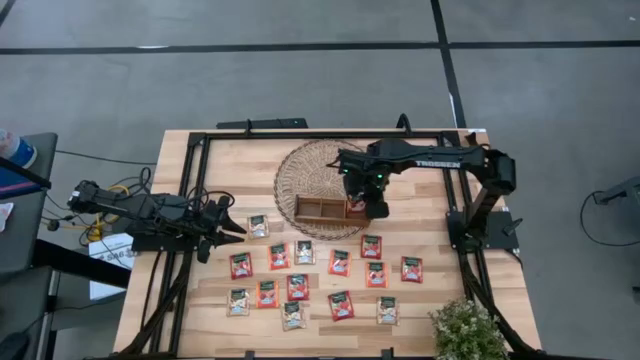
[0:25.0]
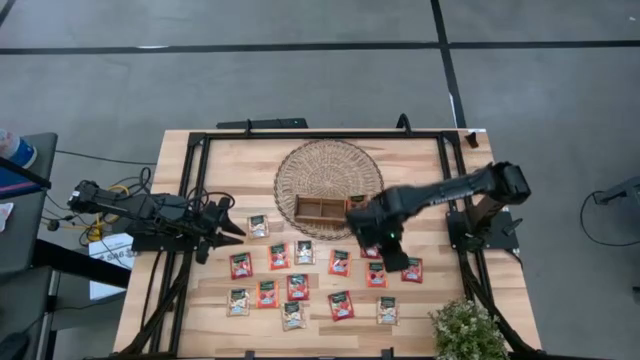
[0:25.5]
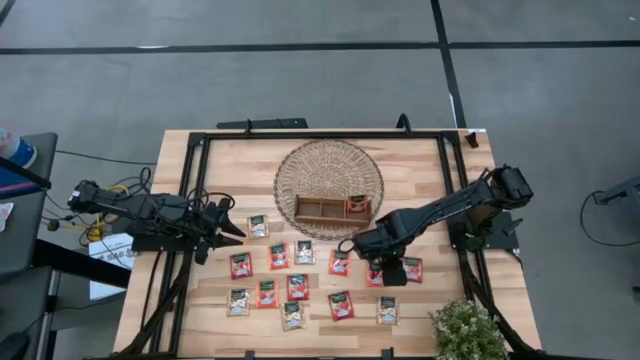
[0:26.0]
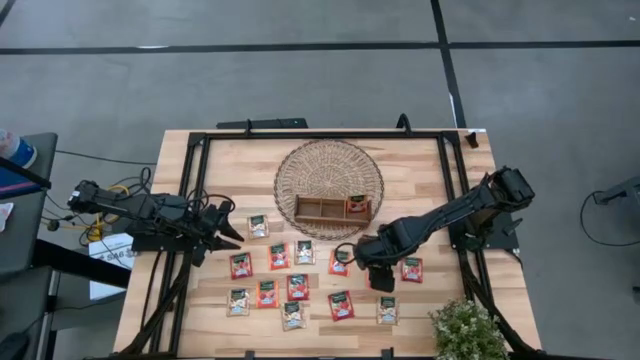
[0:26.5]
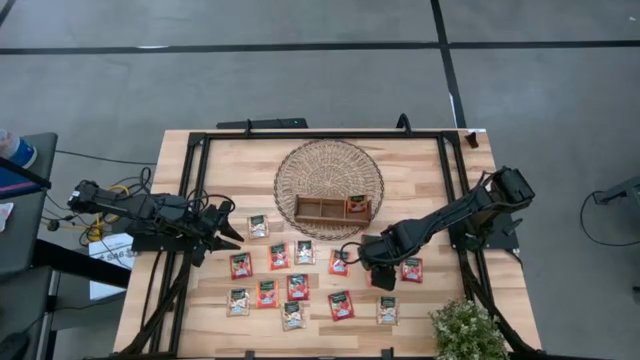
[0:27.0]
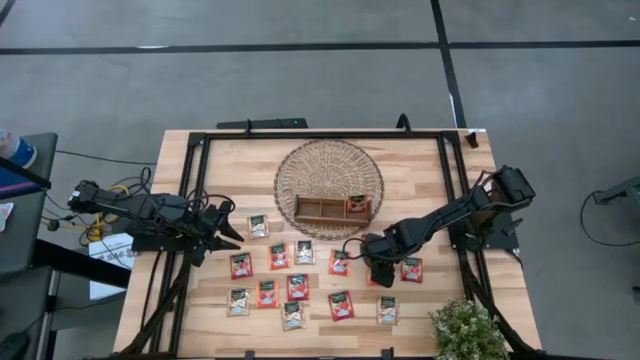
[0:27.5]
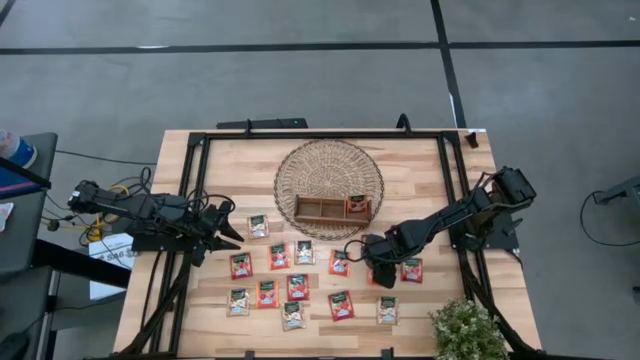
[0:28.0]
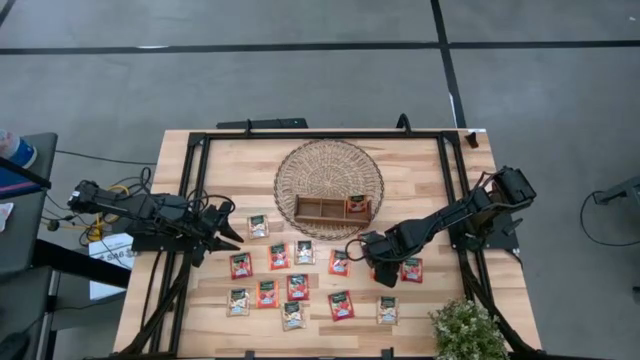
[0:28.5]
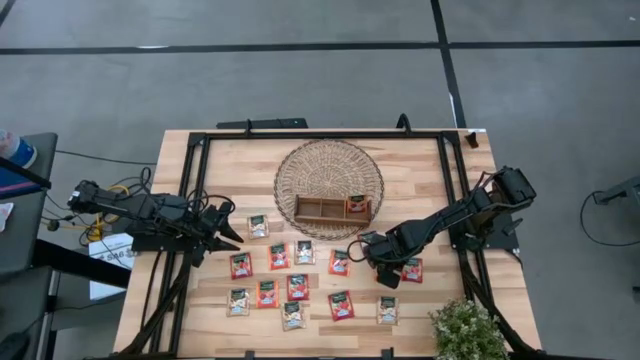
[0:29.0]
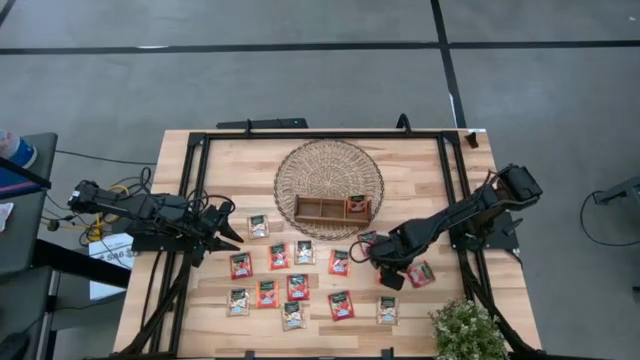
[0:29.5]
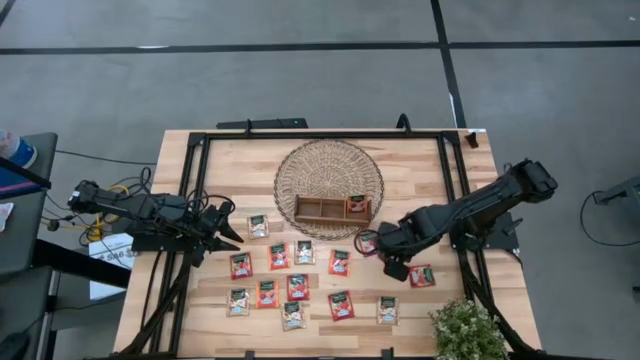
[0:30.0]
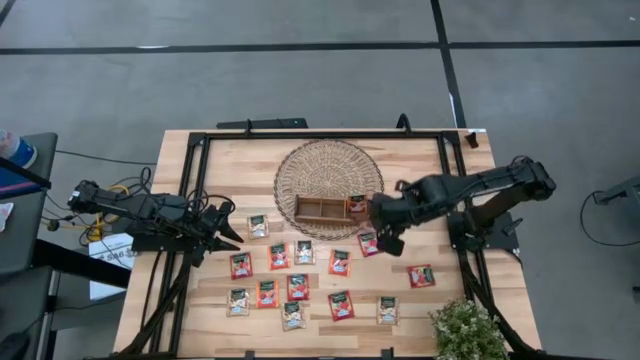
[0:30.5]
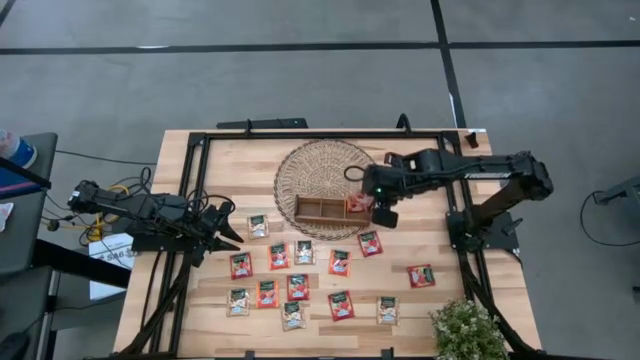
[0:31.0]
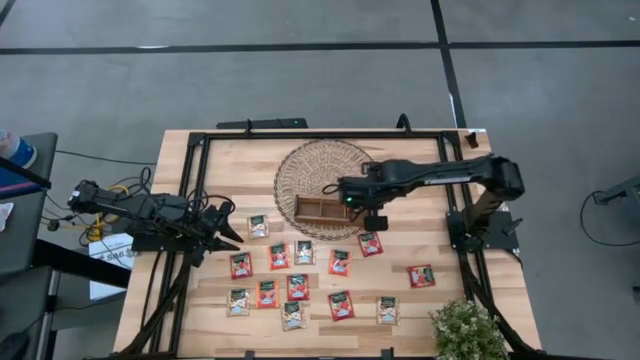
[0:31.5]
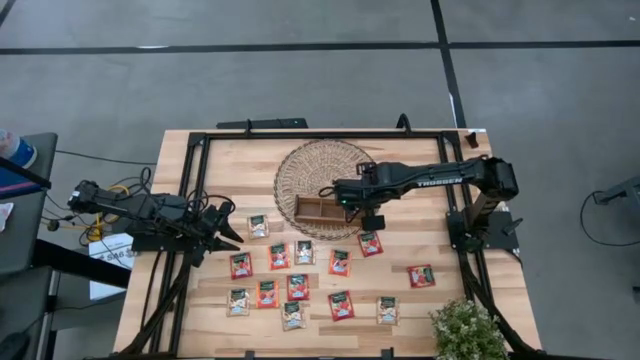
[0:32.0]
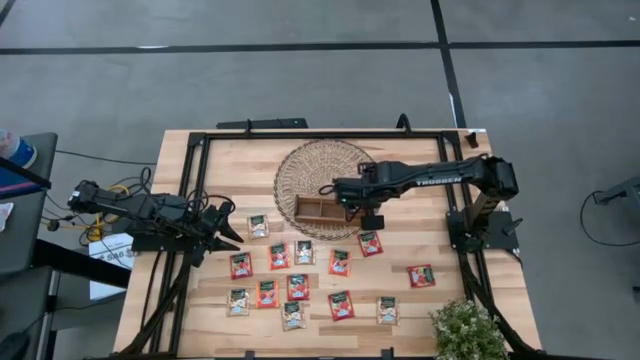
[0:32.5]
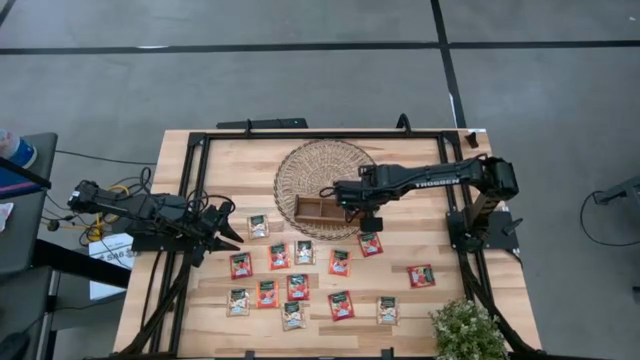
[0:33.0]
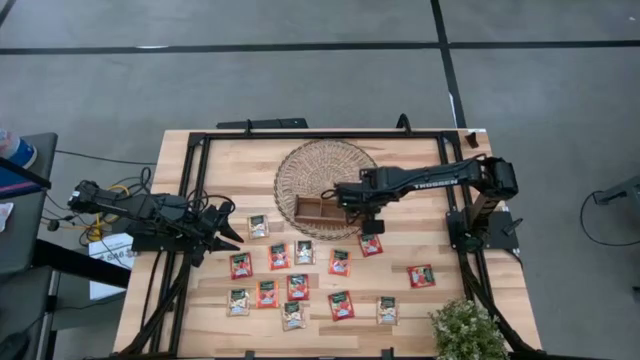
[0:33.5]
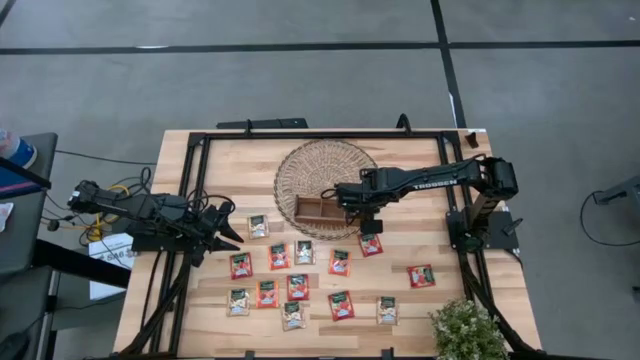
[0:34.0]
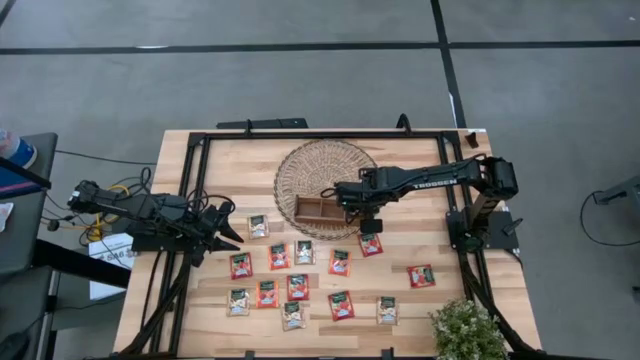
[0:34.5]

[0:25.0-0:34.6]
Task: Pick & Place Tea
Put the orange tea bag into the right section of the wooden organizer

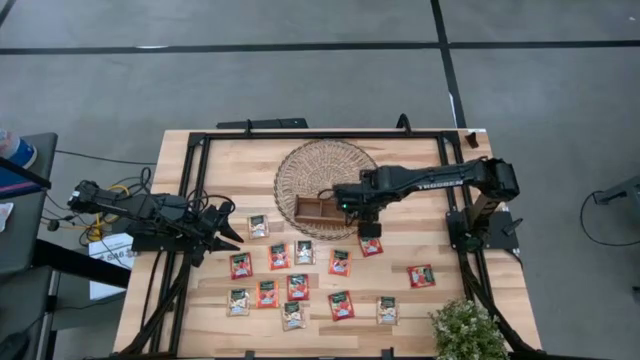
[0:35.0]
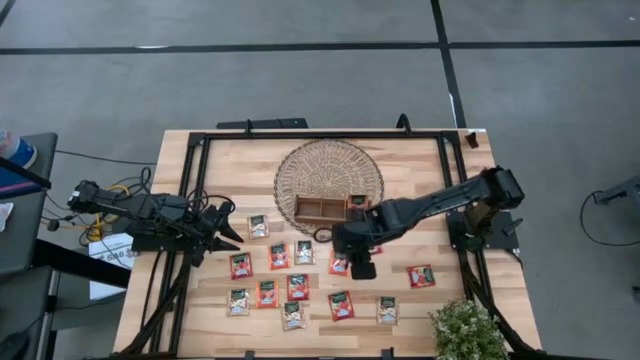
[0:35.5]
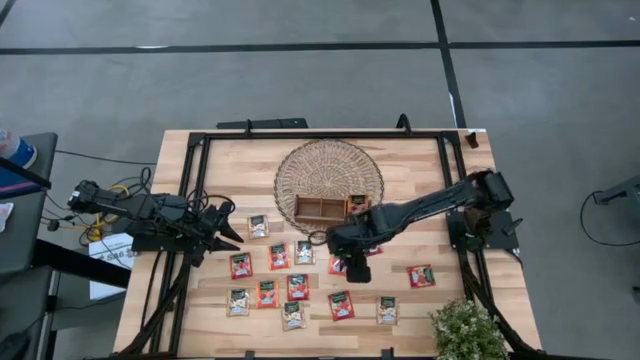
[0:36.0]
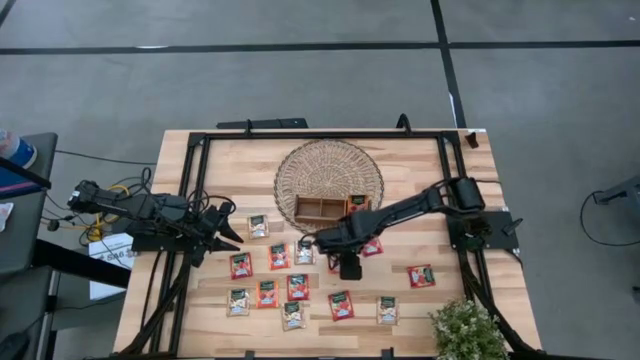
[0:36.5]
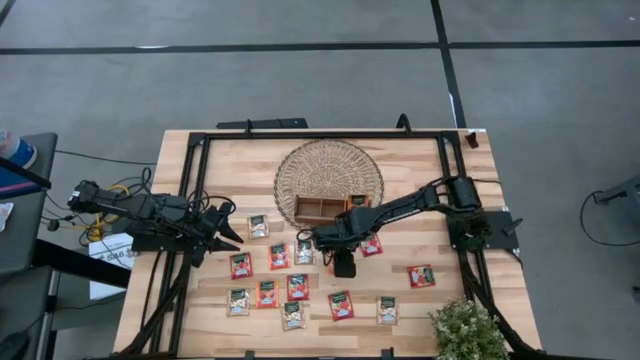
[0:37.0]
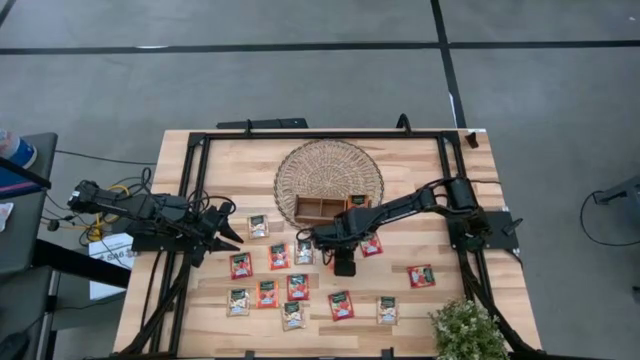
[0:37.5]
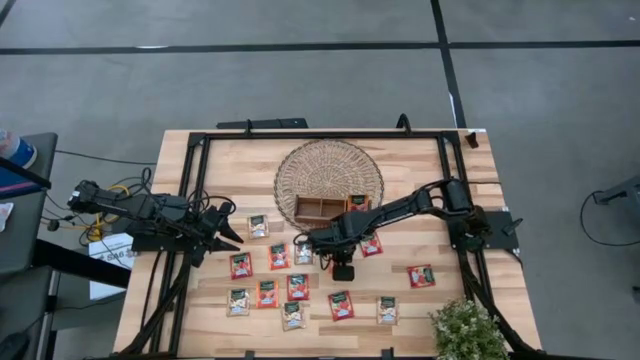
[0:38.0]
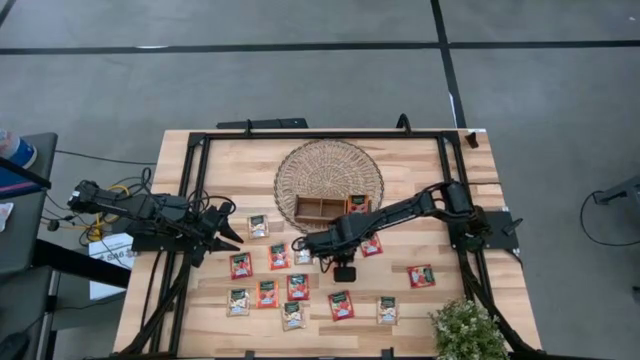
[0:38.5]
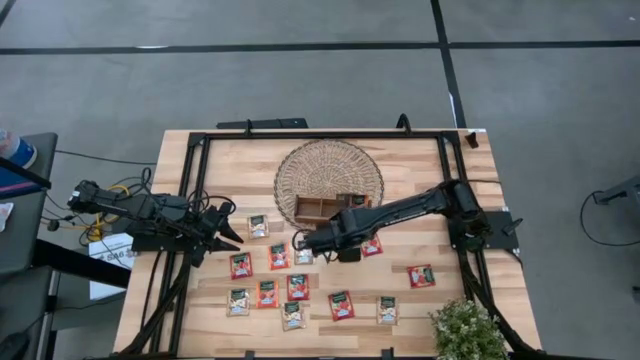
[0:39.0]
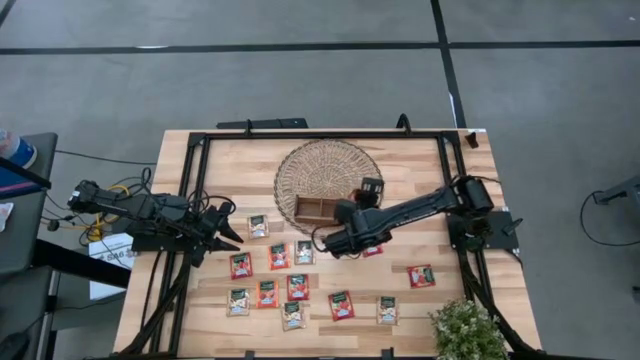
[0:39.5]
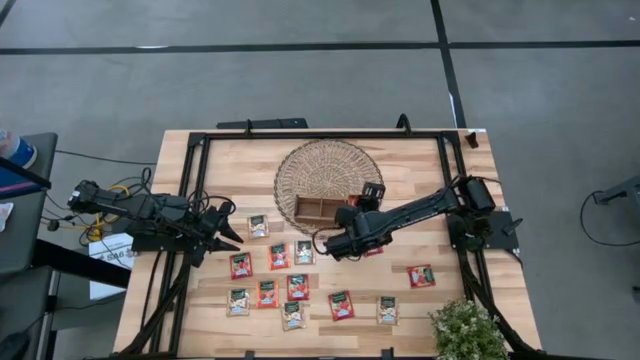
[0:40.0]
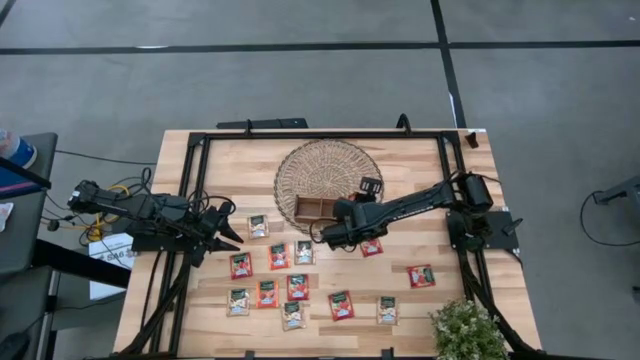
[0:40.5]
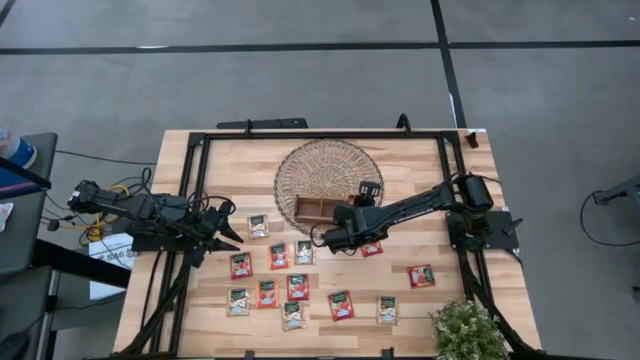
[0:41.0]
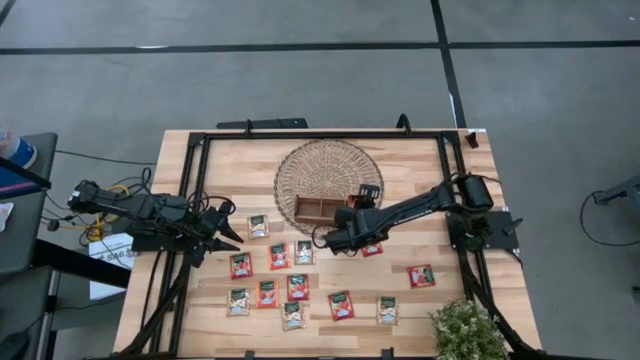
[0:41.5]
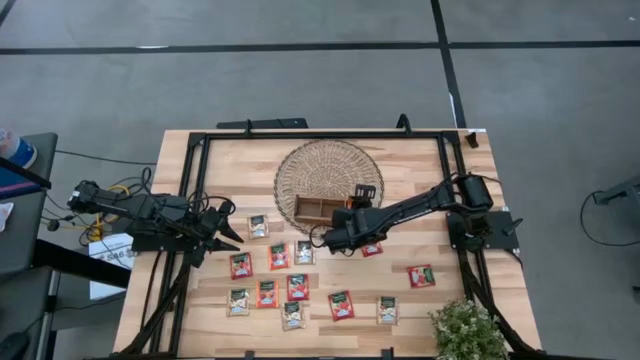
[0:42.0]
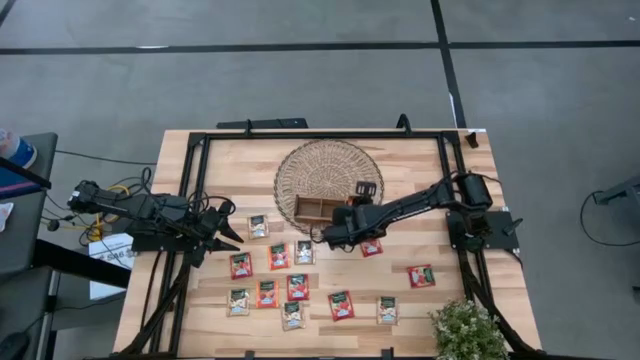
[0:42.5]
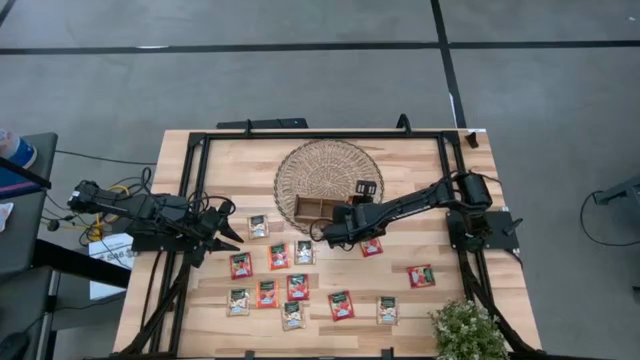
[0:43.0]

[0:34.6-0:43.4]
Put the orange tea bag into the right section of the wooden organizer
